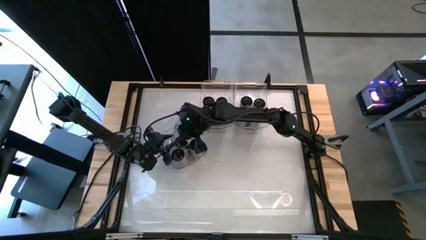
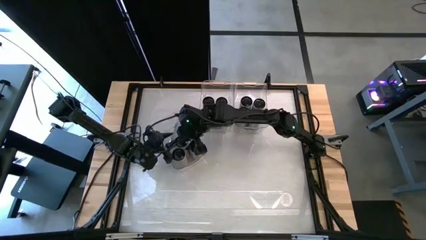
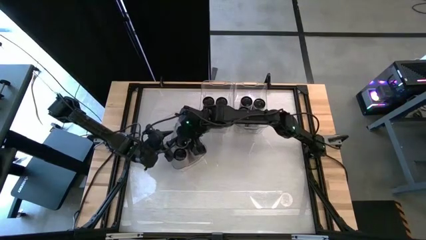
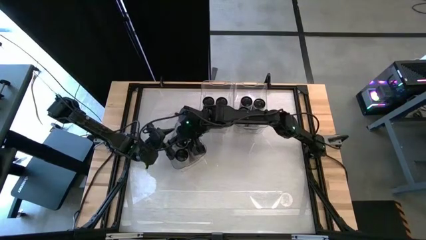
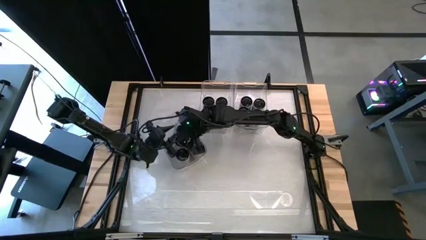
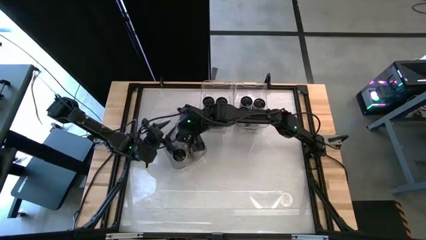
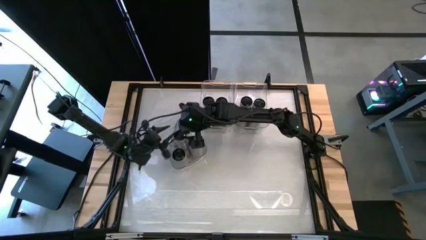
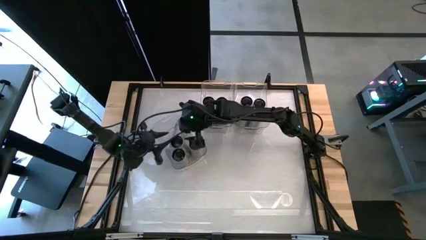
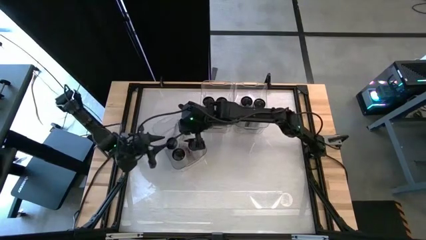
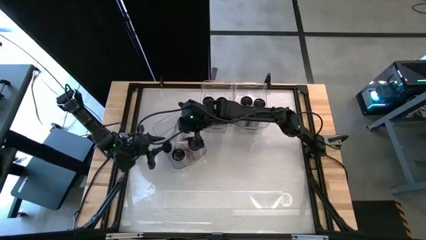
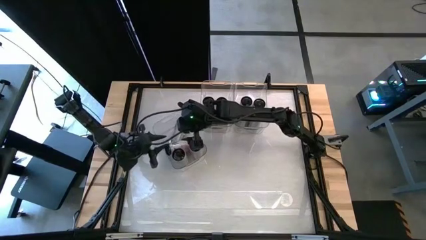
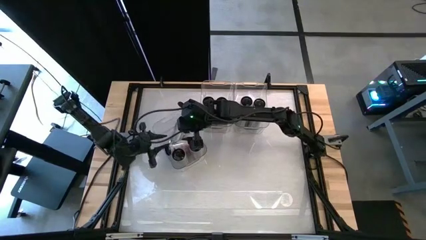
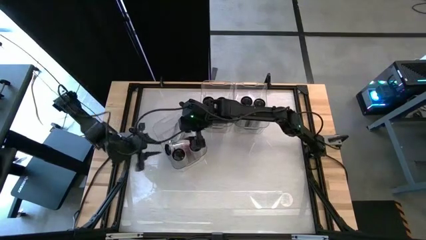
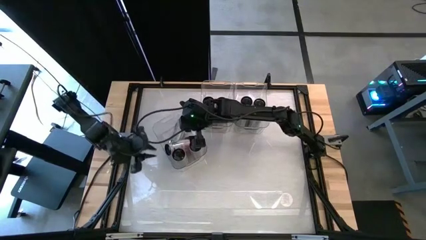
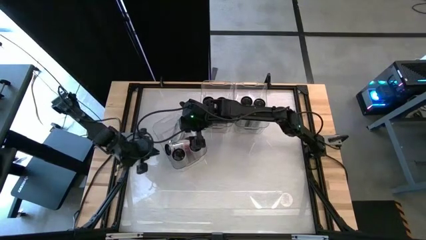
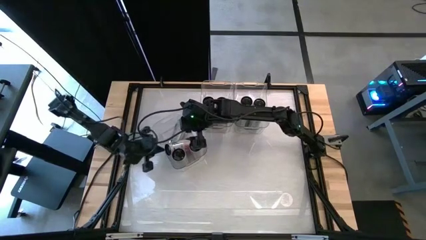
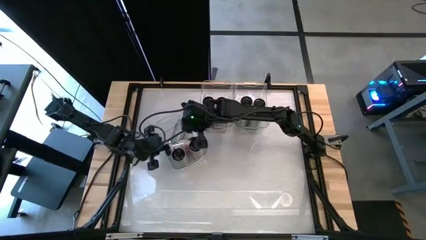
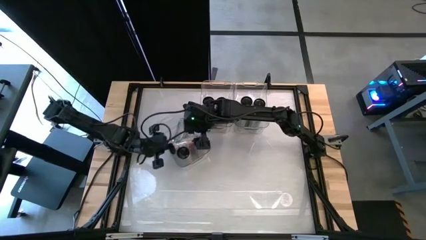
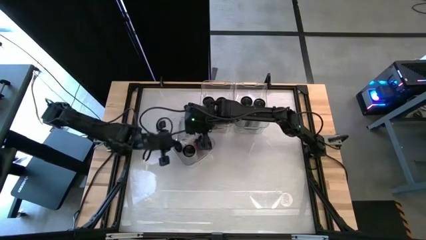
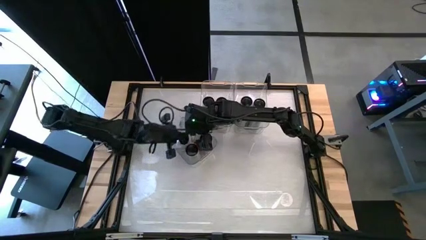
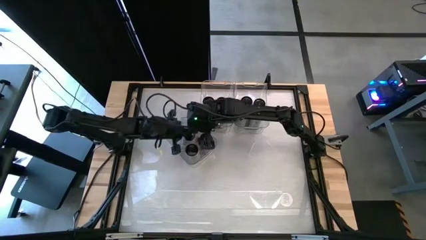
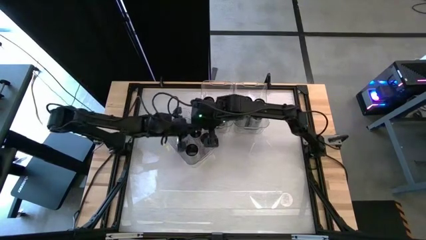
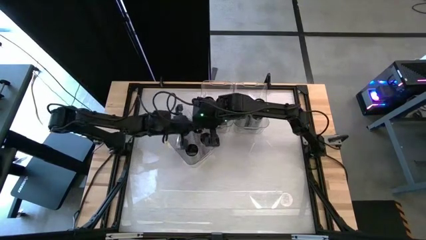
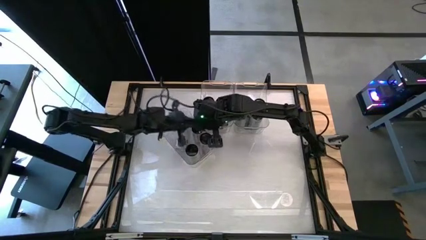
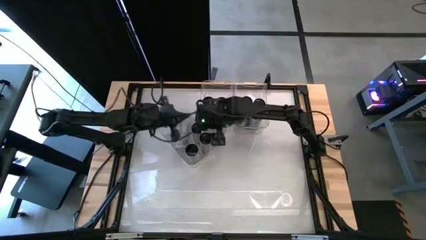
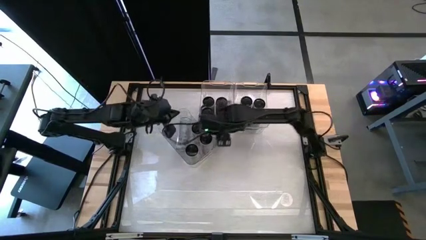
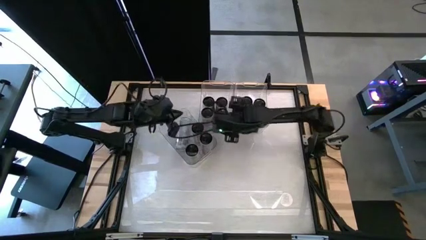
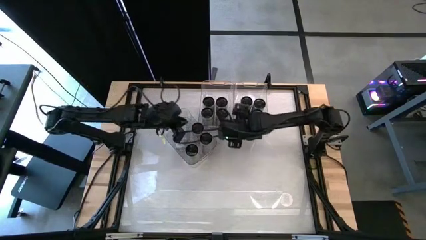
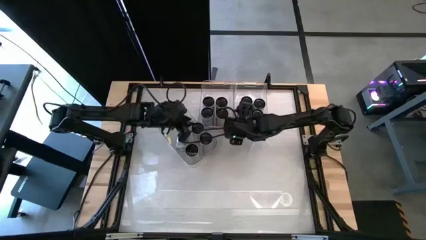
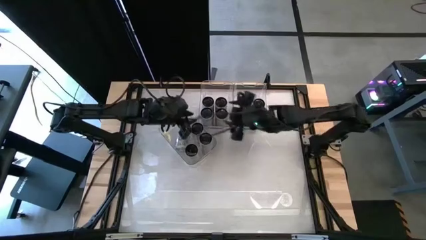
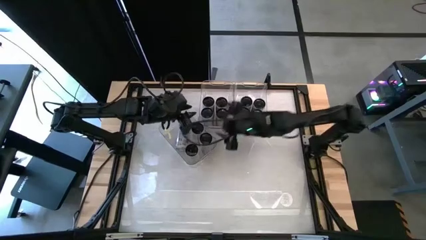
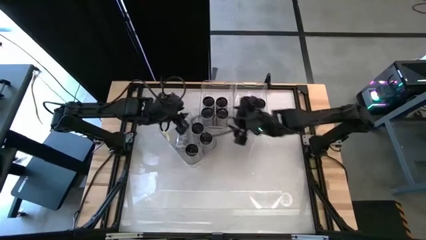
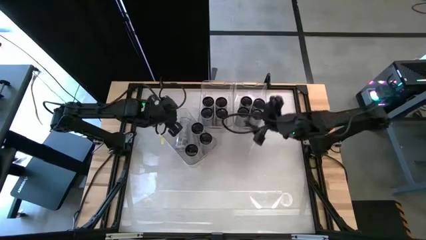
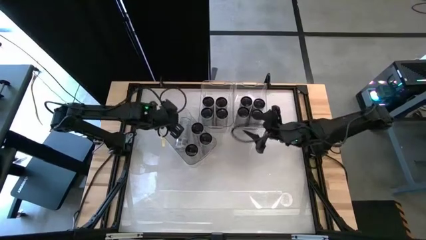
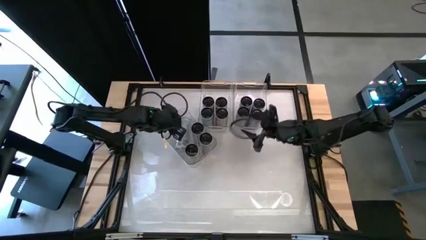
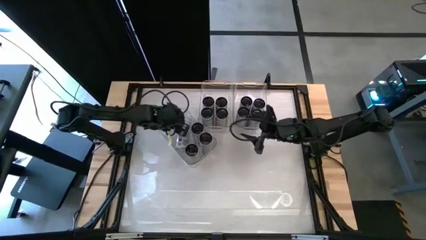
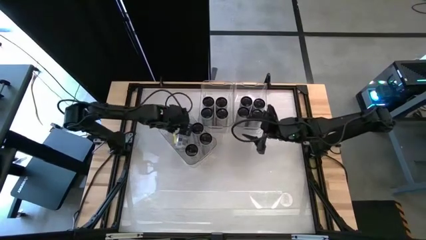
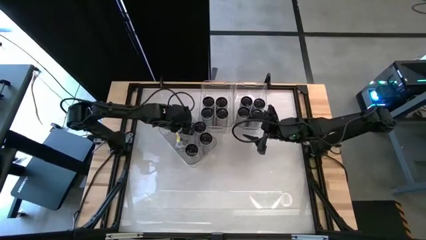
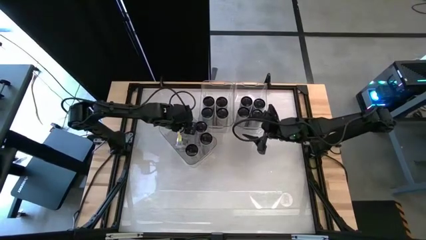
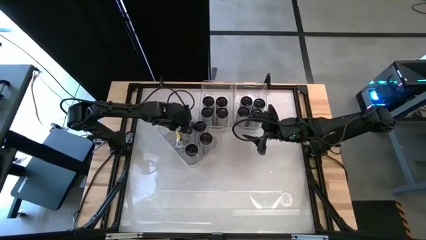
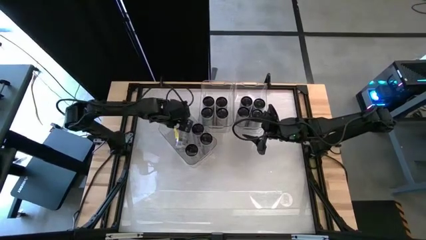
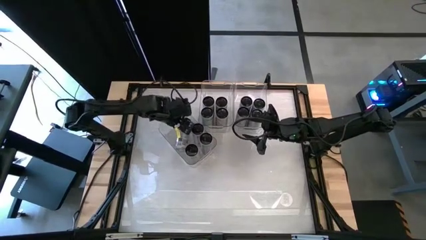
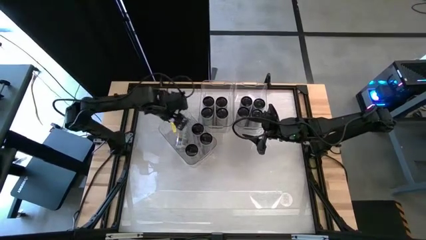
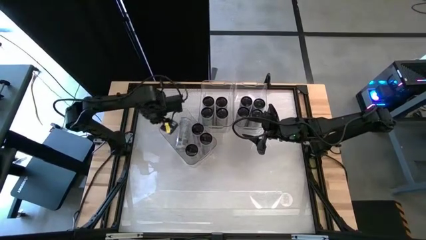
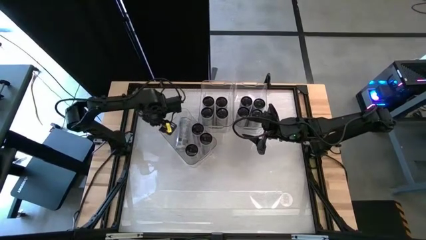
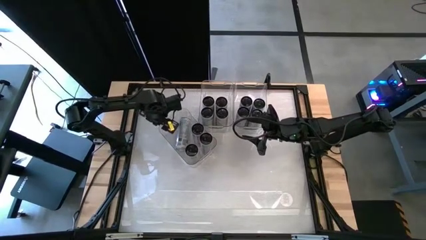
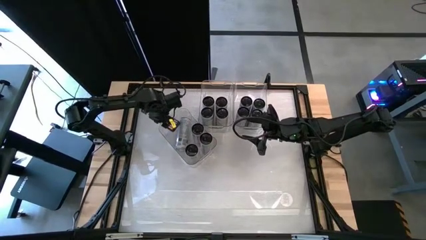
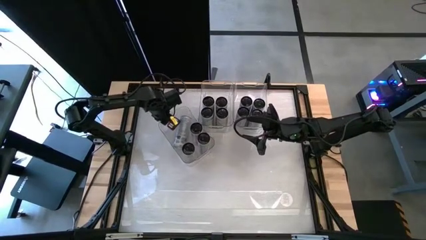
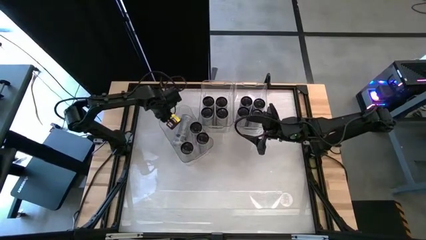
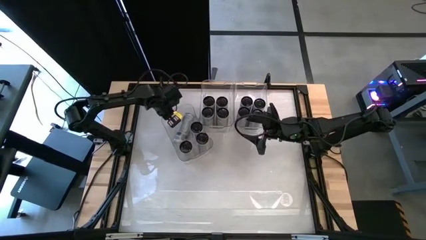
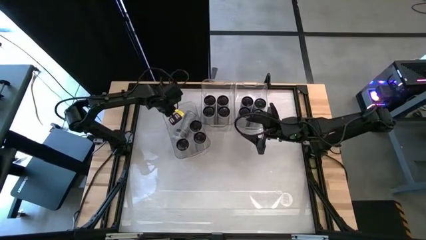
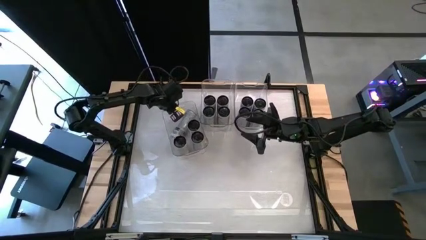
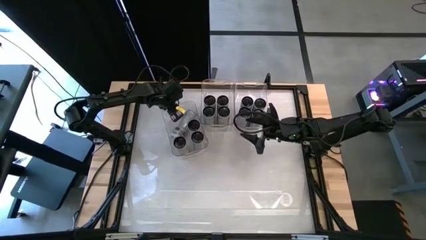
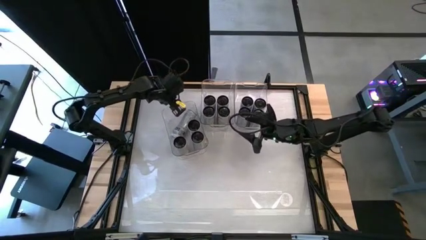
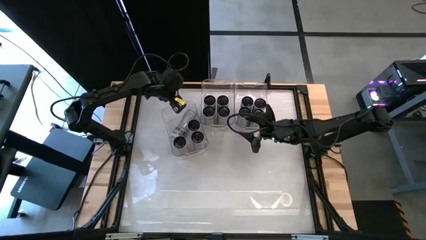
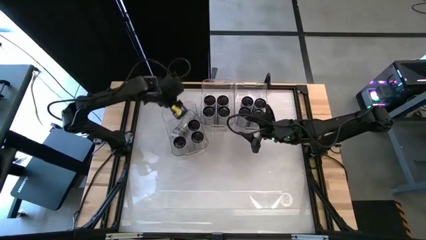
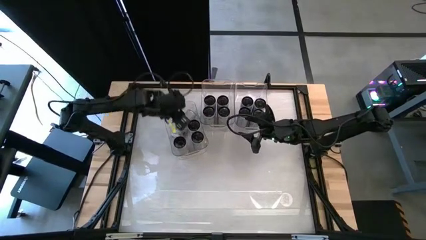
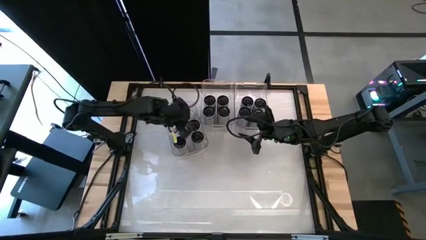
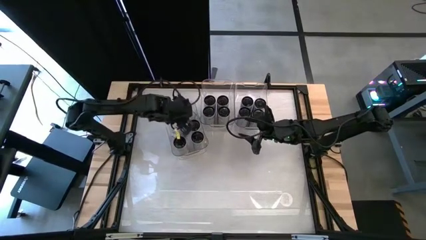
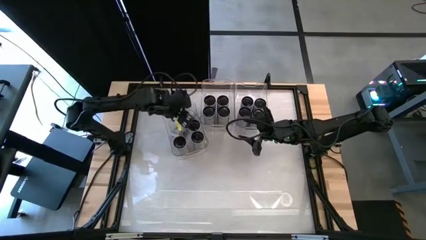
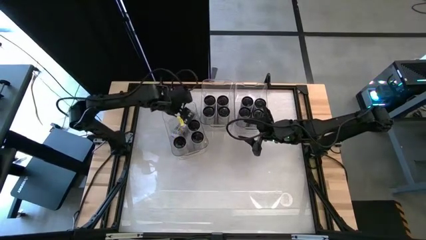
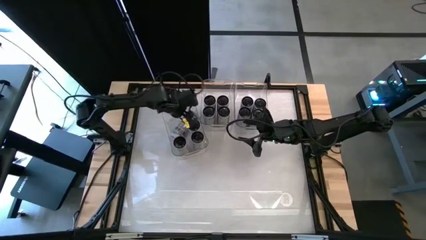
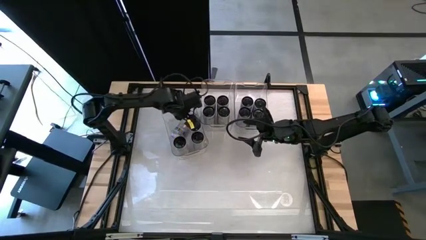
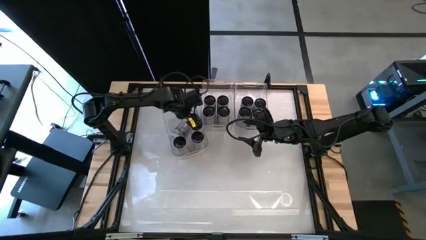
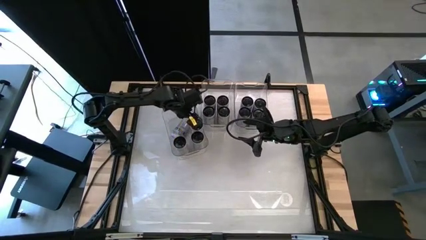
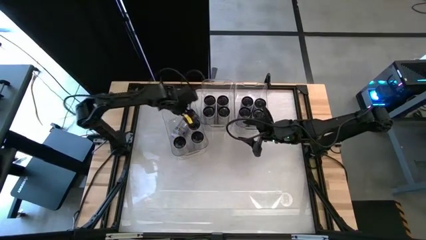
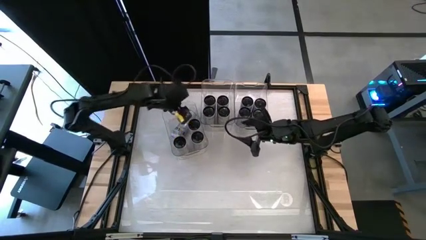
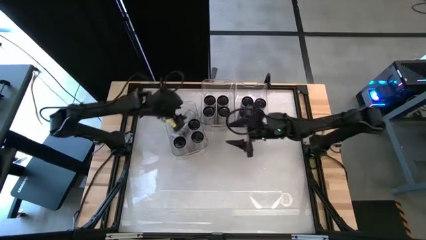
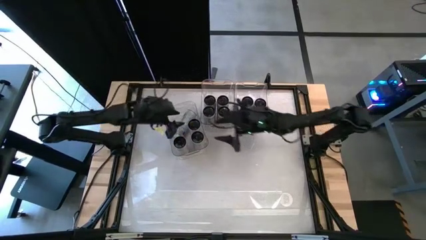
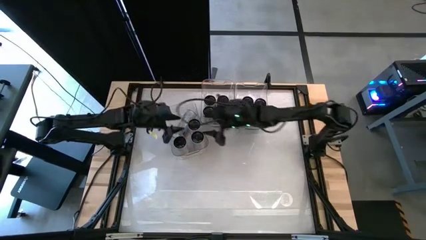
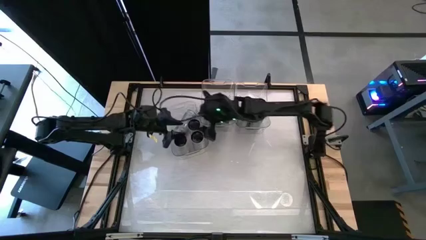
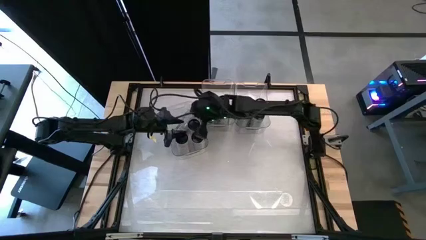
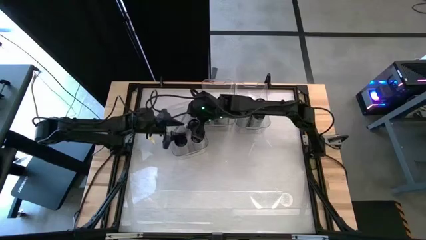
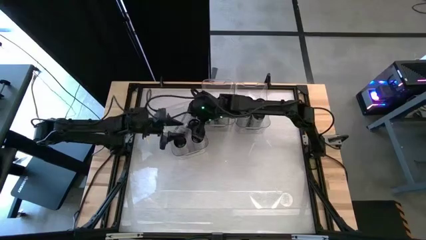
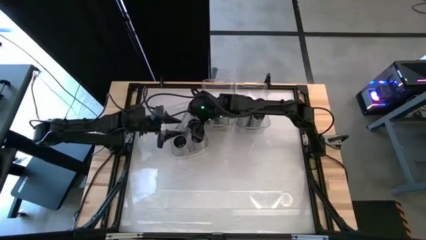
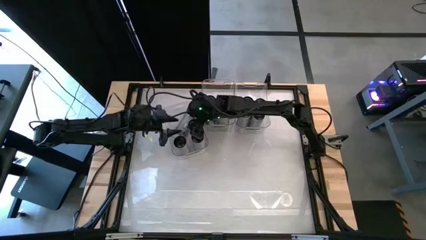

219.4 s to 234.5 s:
Task: Sort soda cans
Adjust the white pink soda cans
